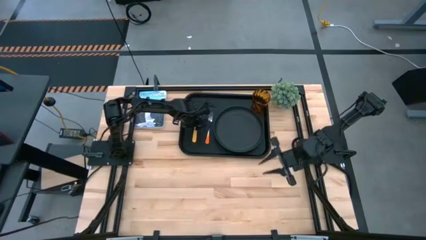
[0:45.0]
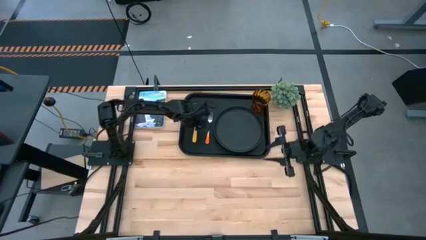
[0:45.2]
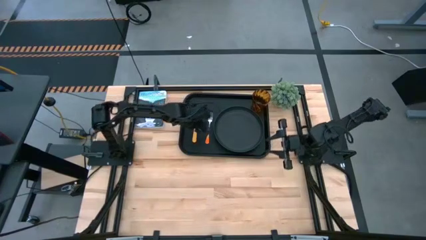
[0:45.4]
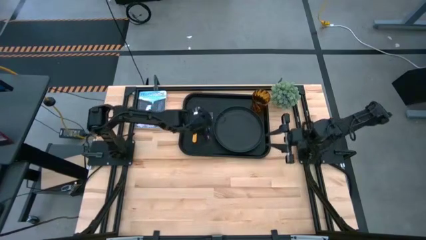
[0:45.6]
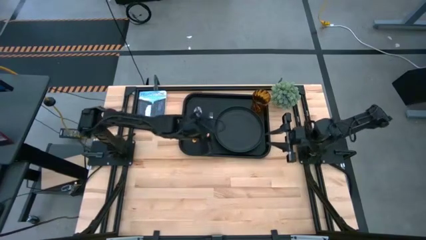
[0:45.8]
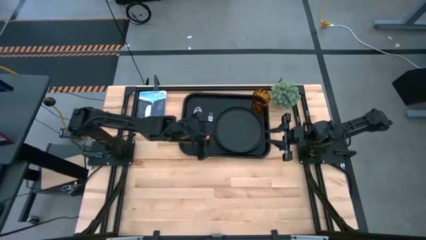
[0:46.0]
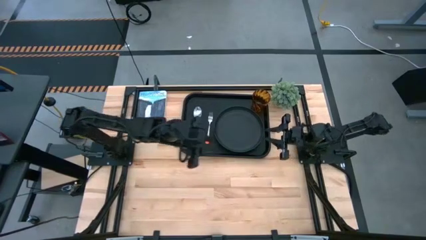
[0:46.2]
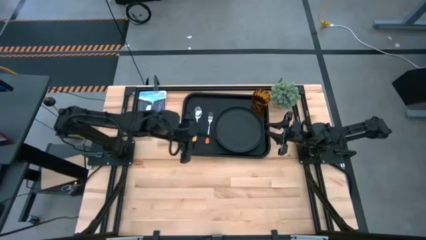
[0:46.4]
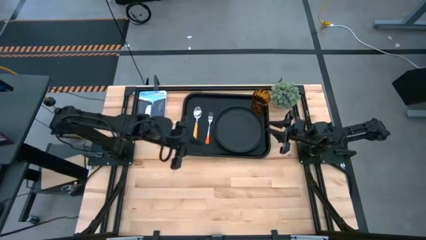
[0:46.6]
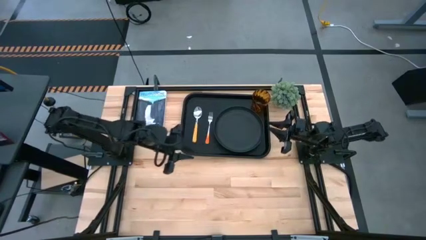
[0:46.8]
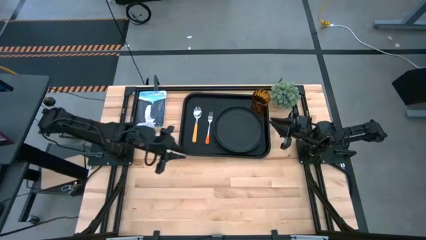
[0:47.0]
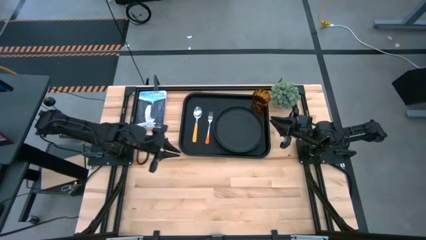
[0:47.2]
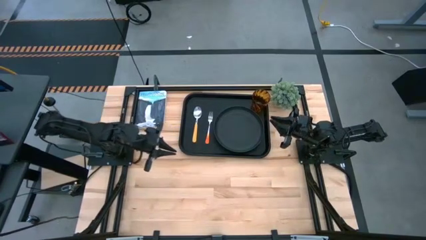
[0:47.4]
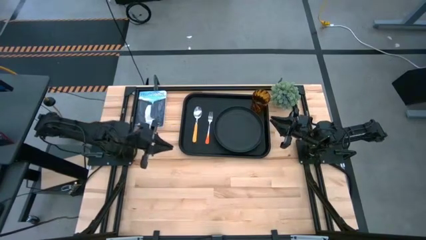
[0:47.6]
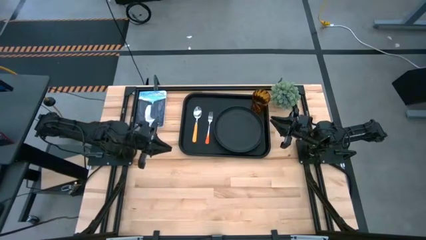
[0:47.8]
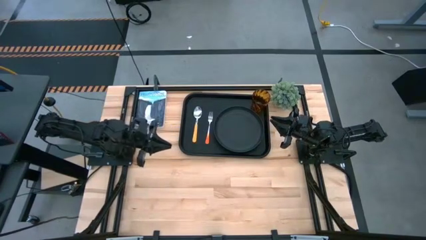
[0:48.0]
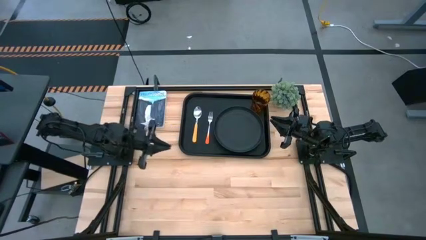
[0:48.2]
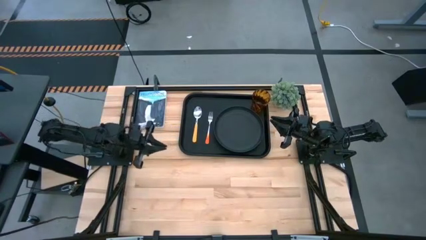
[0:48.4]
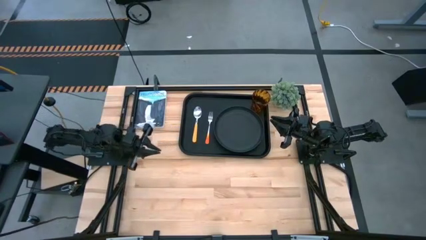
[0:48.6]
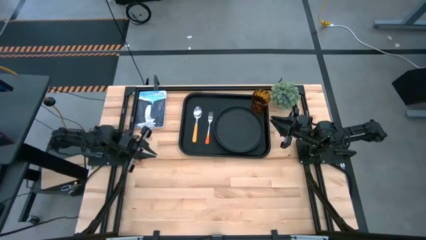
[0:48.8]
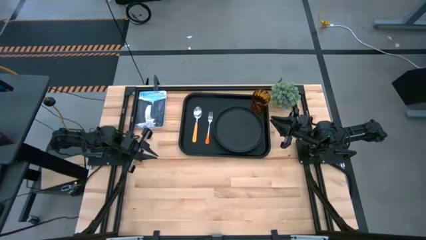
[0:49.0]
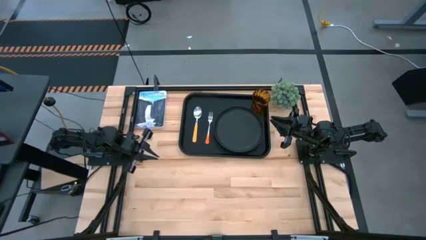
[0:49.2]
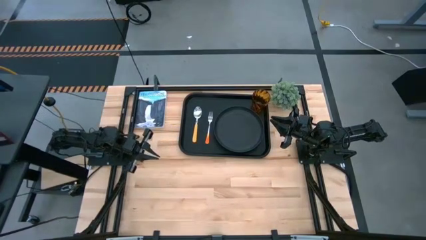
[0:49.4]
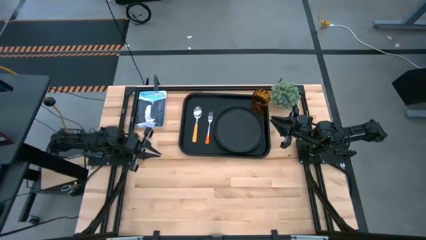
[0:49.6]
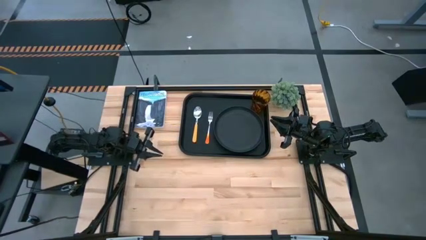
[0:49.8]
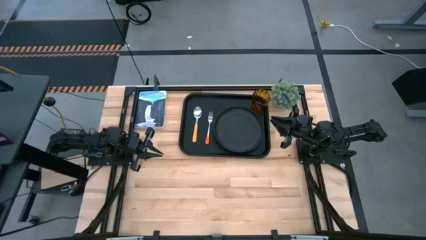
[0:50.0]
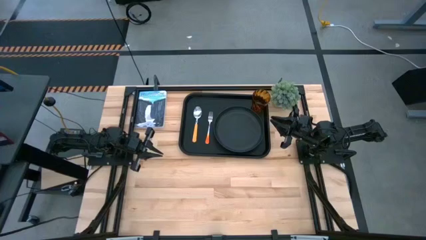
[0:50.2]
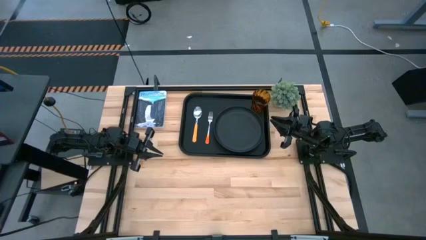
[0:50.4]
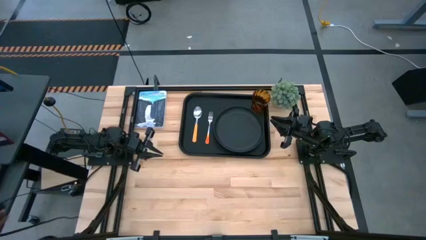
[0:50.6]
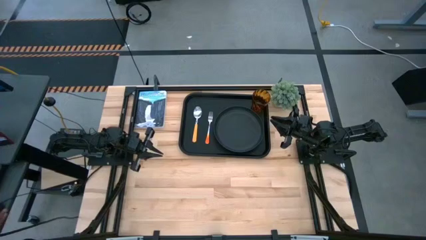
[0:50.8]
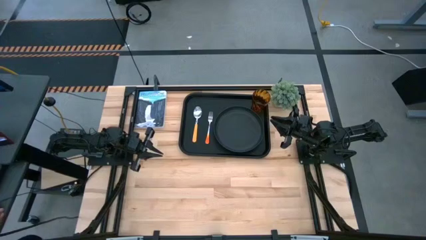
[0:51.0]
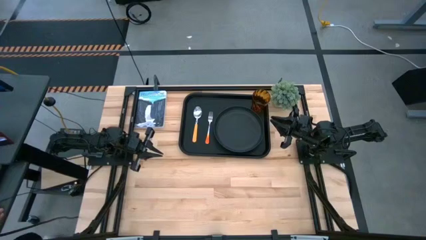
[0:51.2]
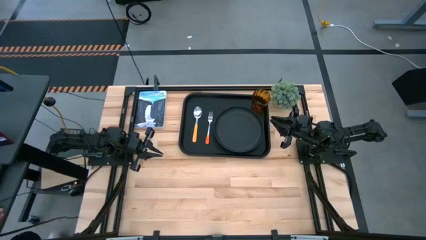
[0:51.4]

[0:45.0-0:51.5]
Task: Pick and place plate/cup/fork/spoon on tray
Return to Home Position

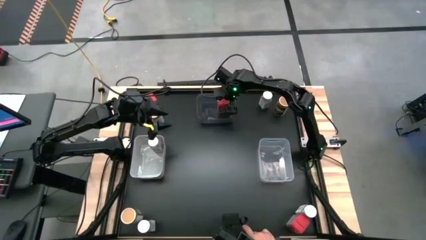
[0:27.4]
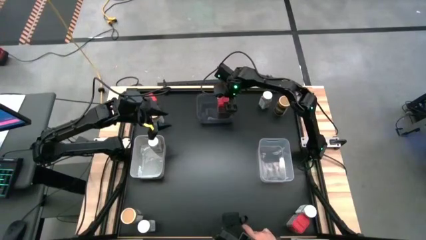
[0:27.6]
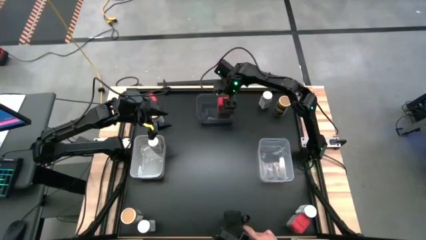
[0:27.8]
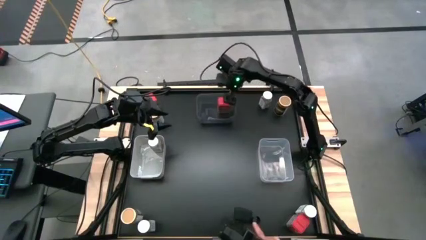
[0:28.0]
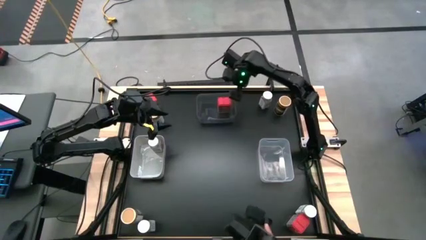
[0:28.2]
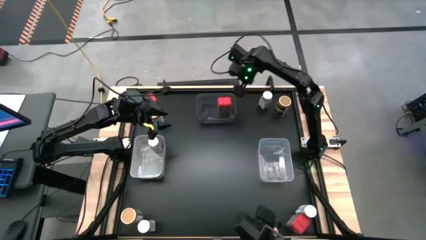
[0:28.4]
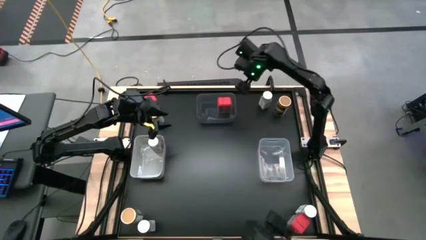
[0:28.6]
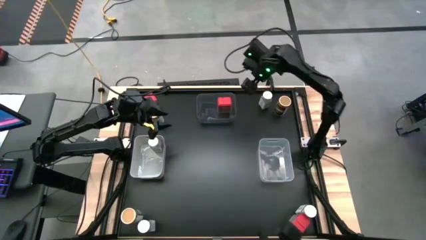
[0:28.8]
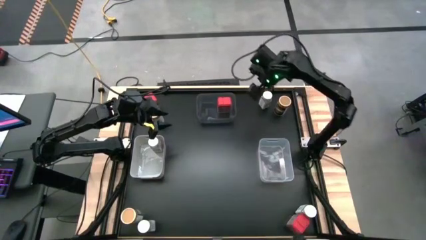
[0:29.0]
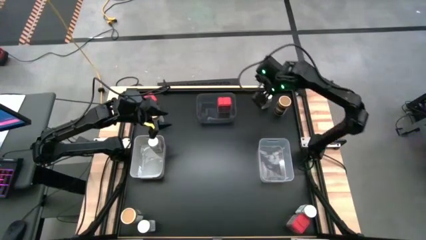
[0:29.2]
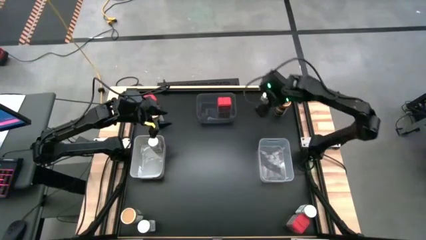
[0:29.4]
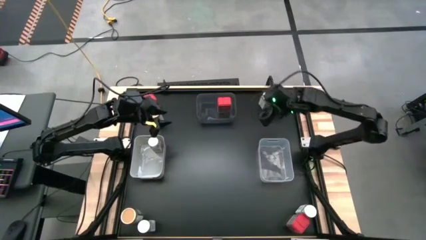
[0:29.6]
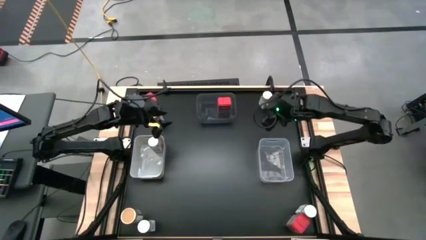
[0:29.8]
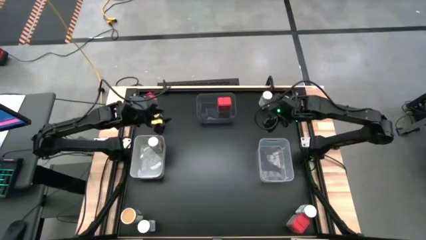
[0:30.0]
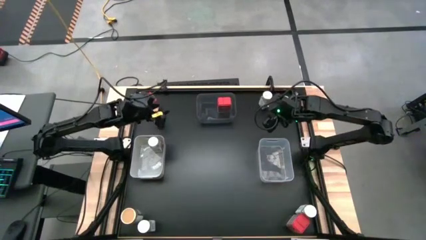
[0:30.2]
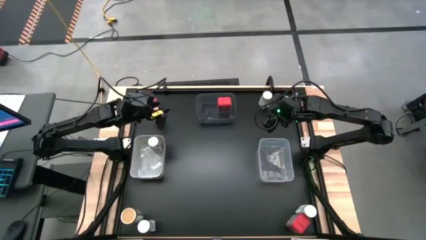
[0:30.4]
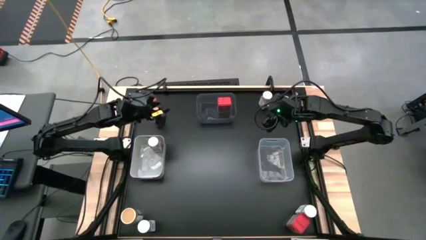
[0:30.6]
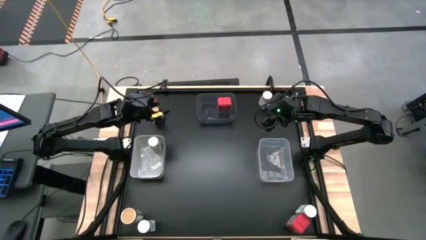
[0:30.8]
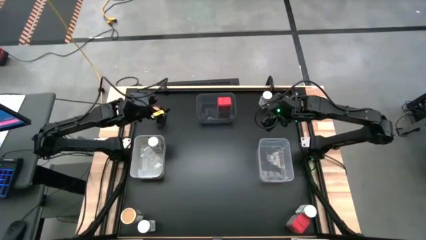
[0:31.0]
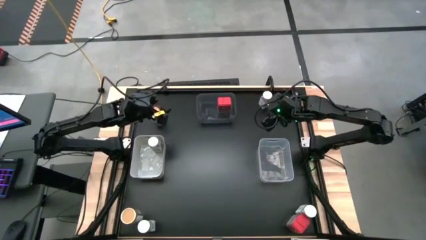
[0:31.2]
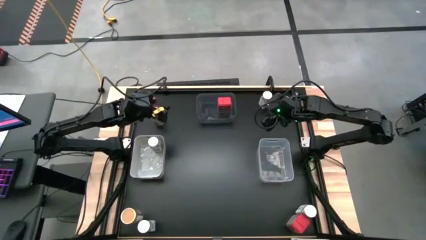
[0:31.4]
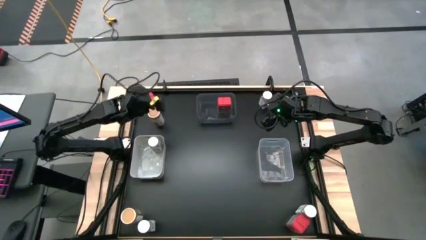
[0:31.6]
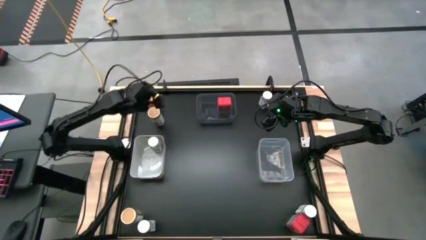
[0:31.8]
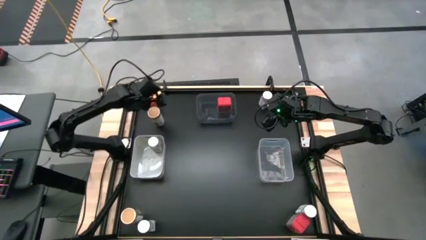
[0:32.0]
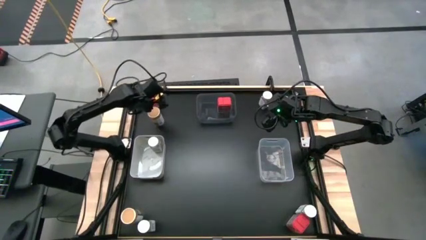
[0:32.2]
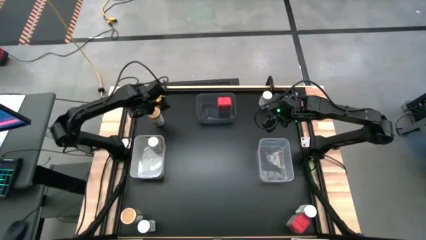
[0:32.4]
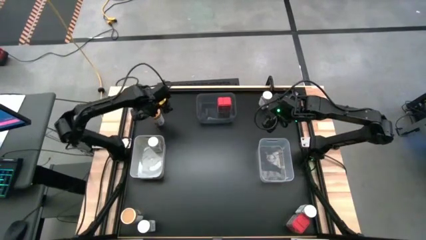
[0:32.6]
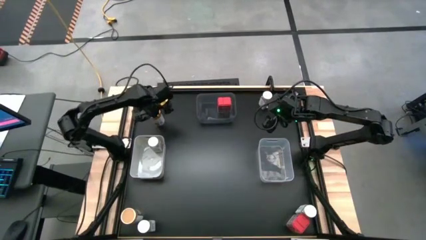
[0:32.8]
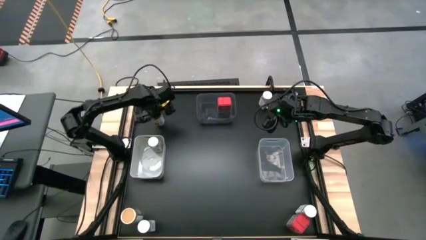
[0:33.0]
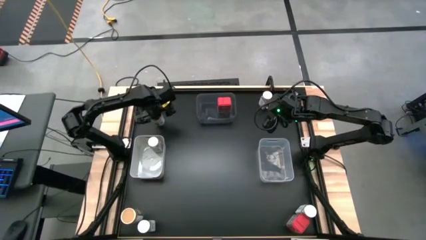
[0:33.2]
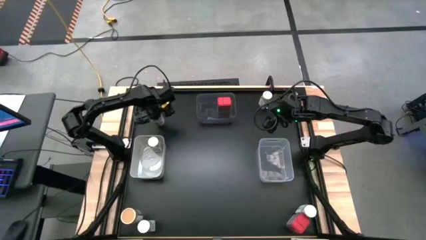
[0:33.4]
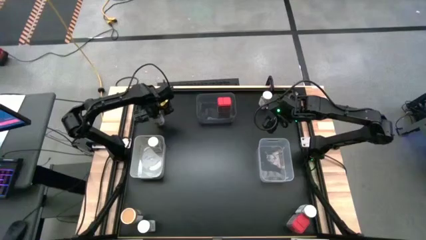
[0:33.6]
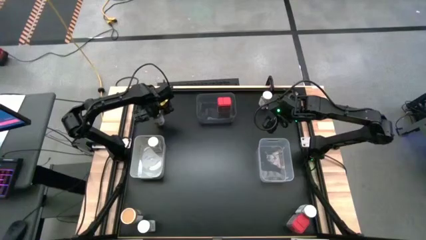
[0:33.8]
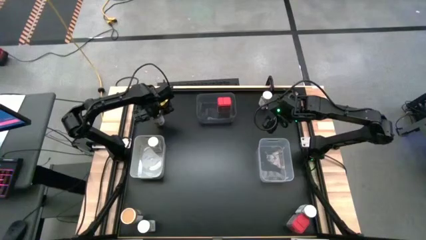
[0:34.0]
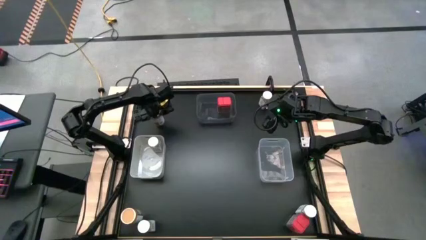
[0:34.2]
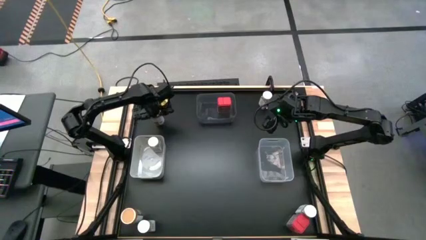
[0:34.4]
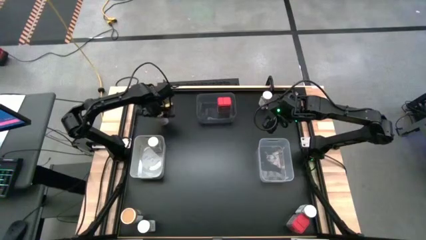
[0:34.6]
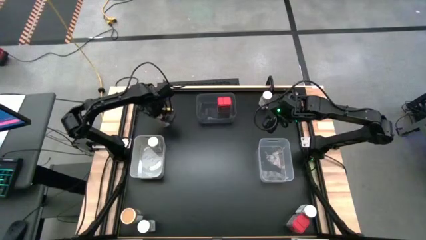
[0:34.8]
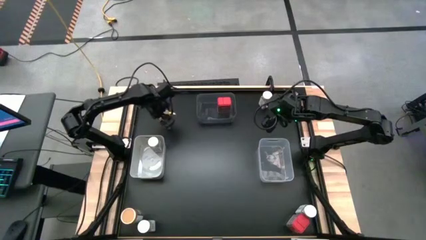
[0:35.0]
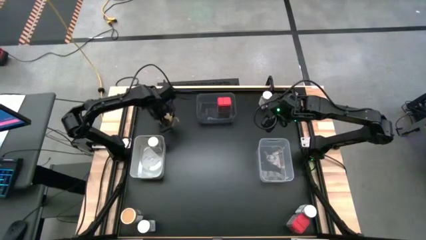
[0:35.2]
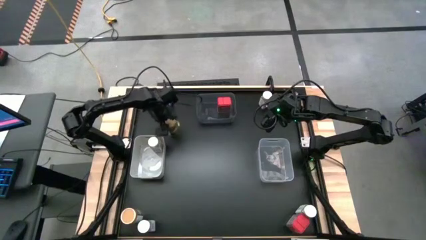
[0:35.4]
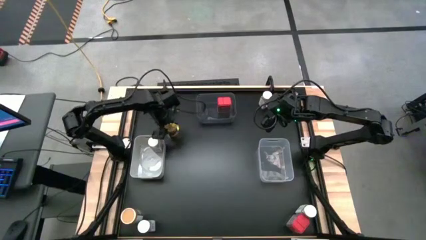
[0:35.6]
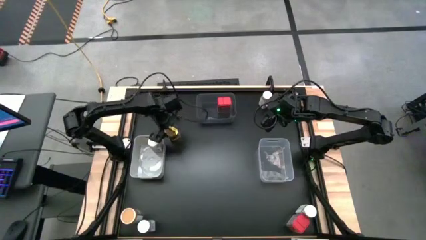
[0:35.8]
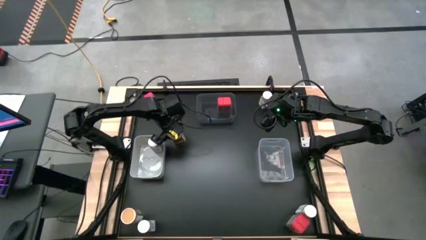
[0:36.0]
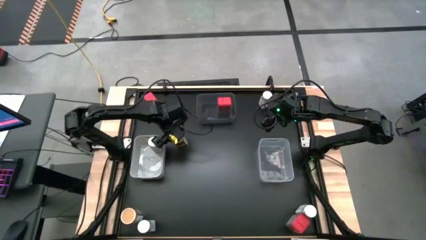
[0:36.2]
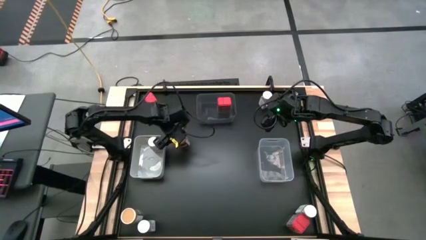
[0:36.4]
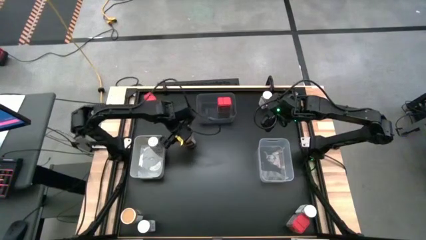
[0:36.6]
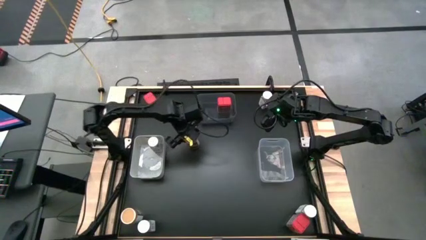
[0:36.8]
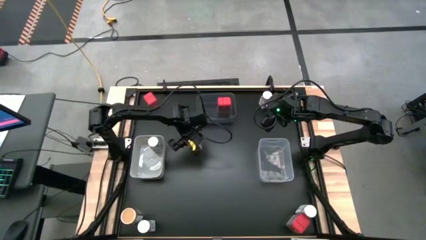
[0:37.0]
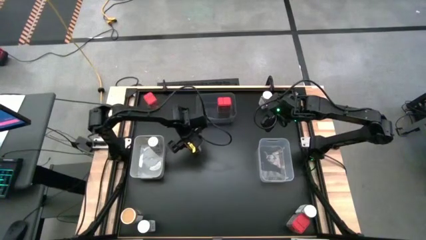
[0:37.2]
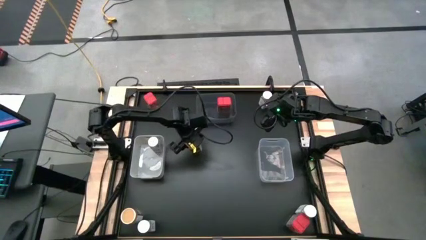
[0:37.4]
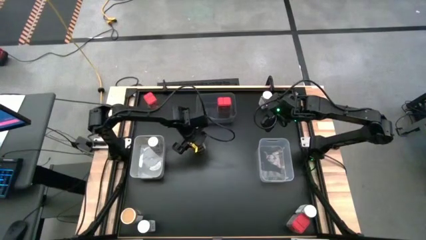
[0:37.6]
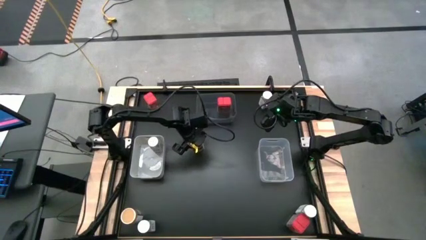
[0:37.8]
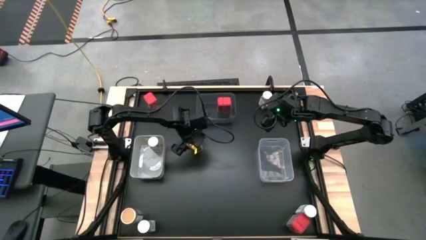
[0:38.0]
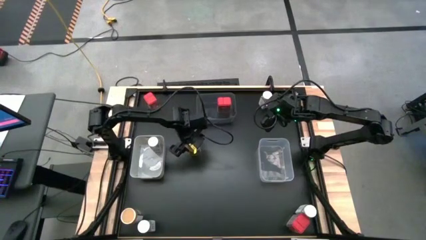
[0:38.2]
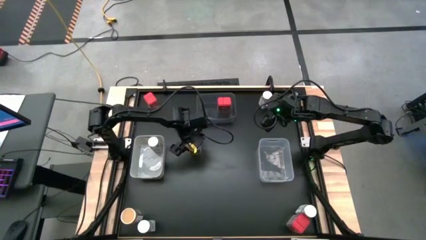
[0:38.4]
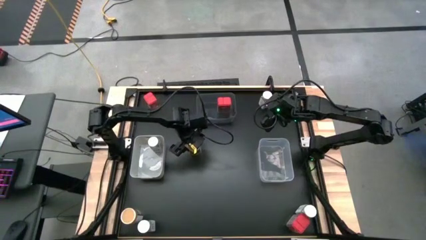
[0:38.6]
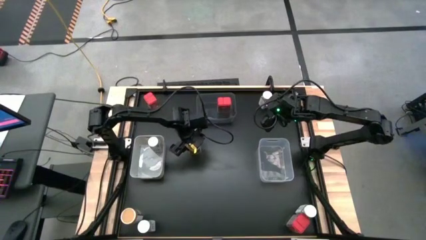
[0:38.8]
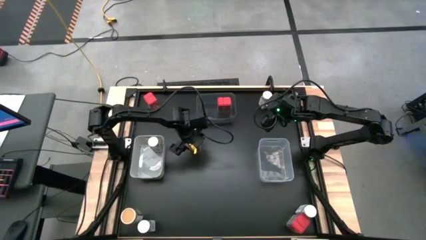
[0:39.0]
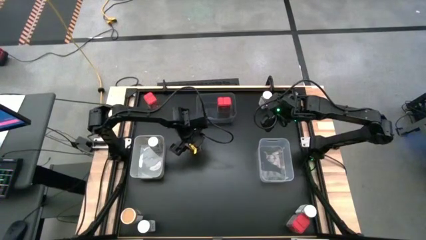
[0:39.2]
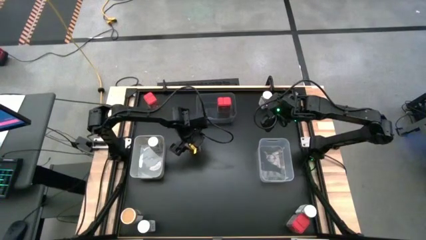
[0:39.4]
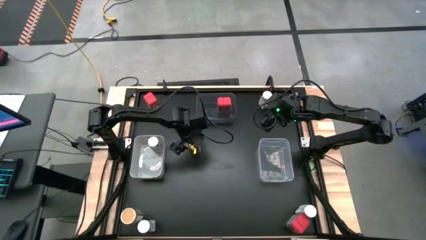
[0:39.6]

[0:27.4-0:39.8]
Task: Sort spices by type
Put the top left gold seasoning bottle into the transparent bin
